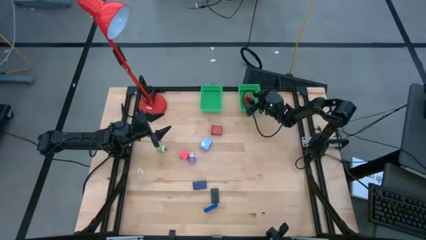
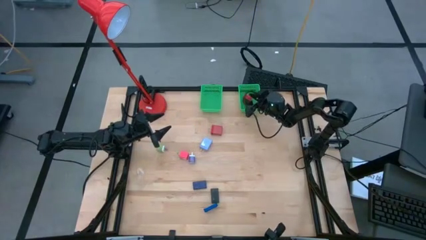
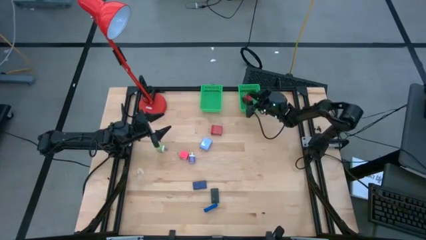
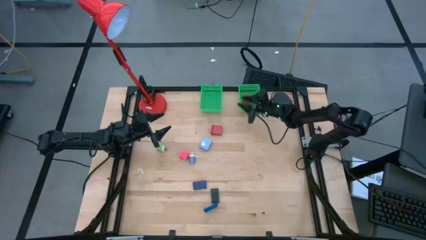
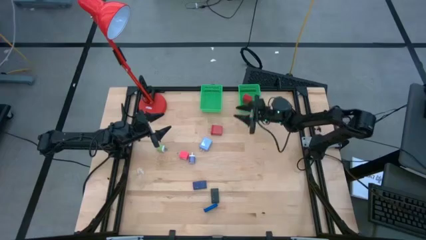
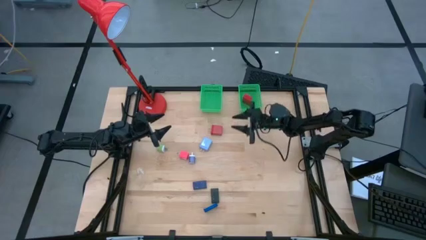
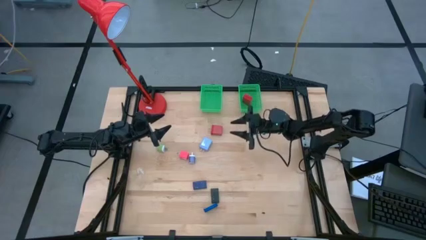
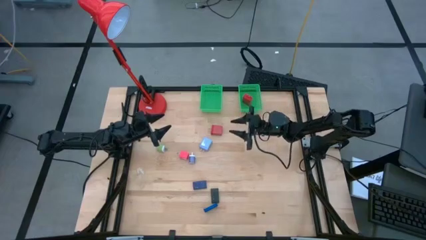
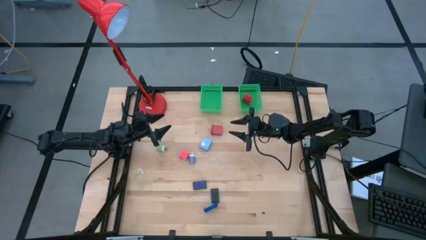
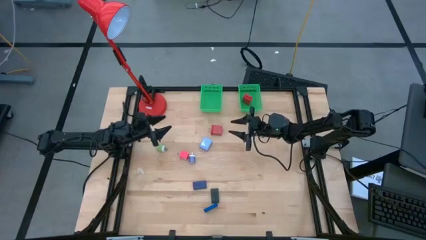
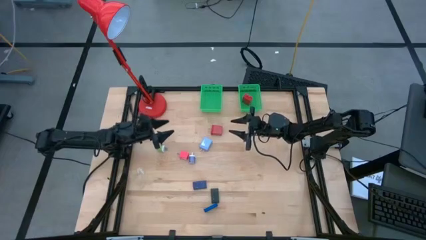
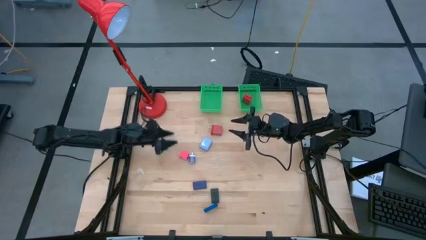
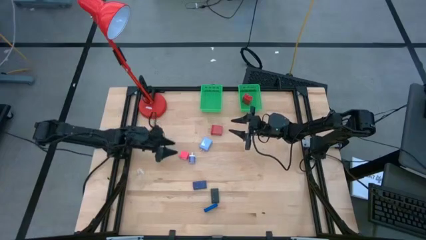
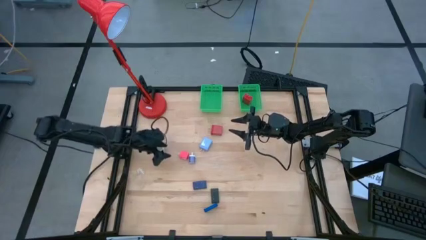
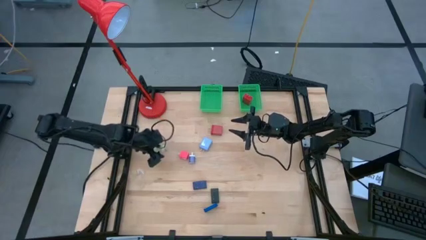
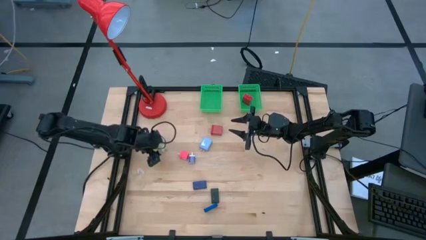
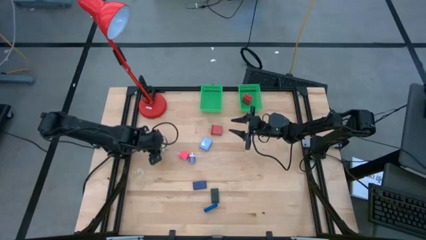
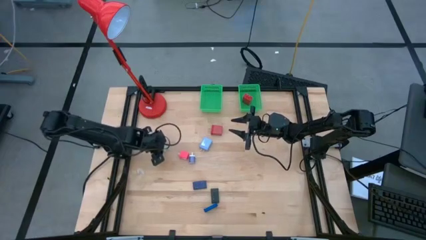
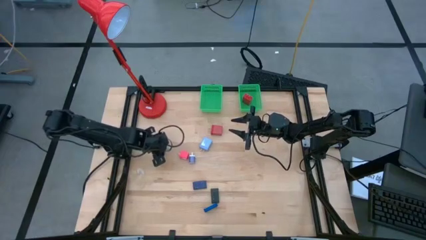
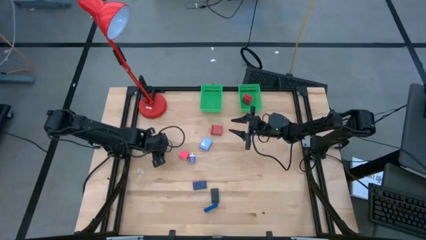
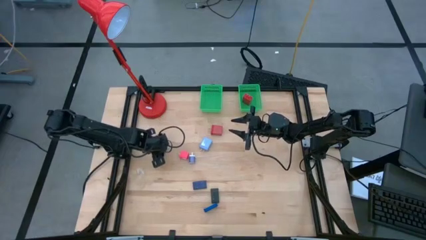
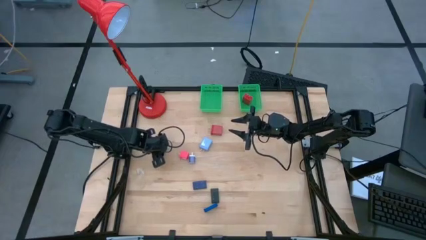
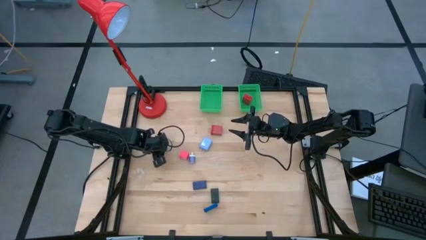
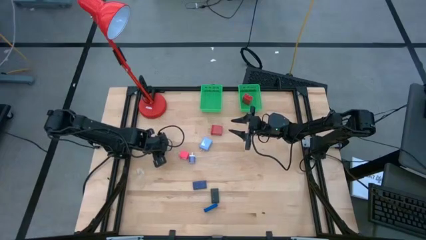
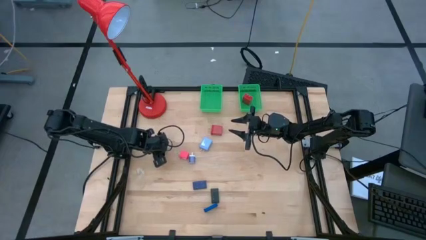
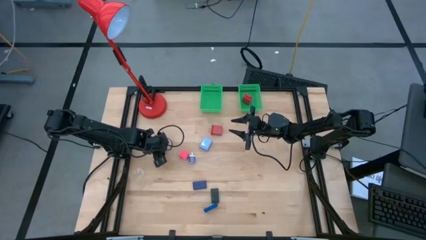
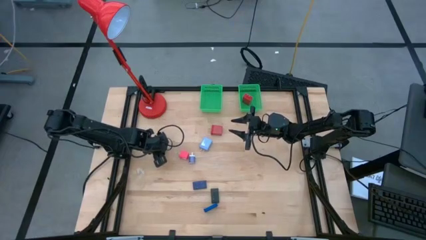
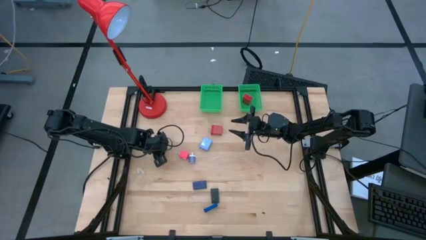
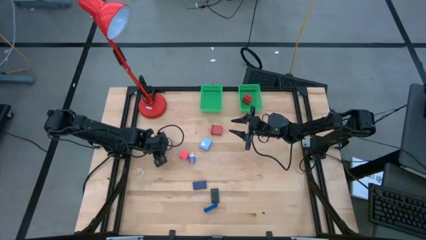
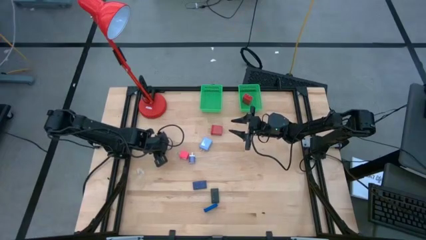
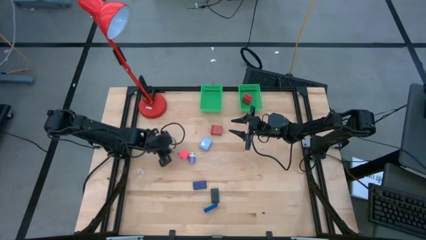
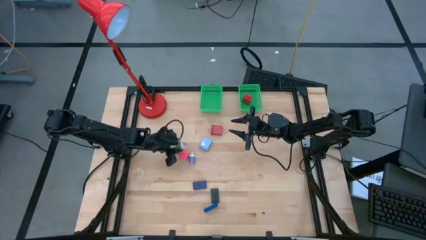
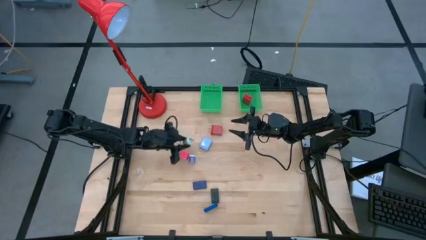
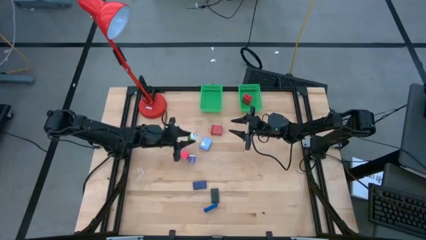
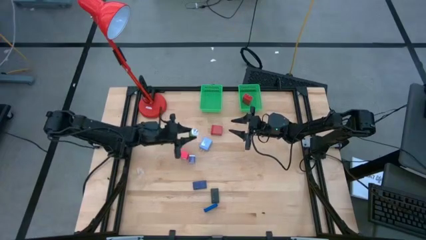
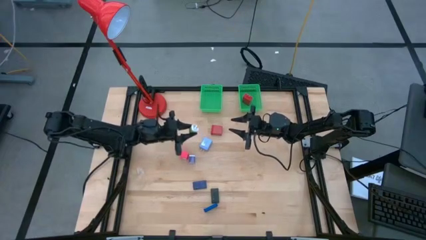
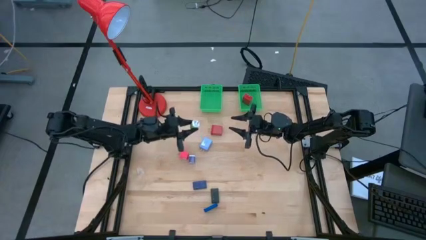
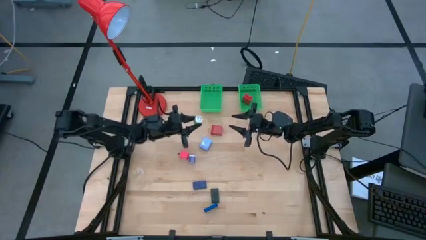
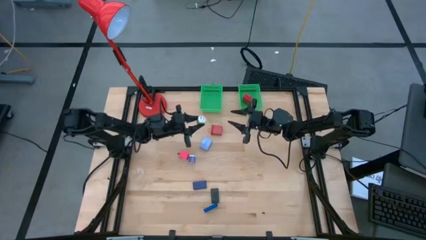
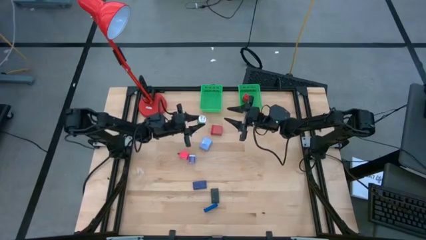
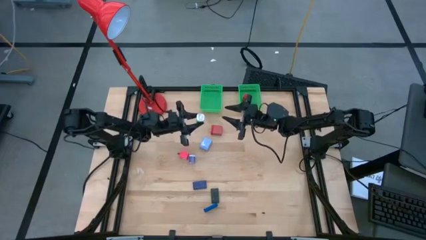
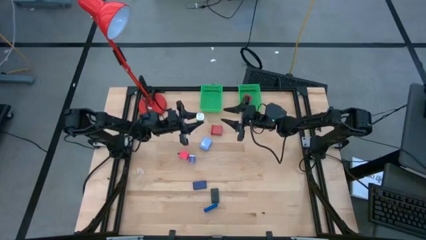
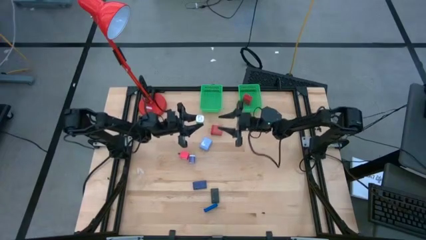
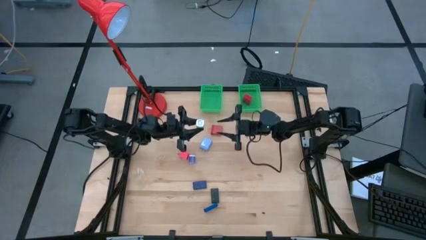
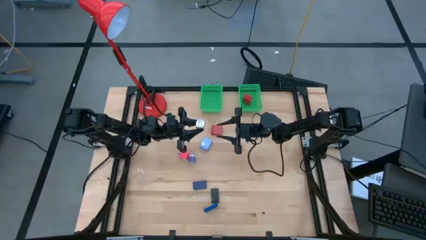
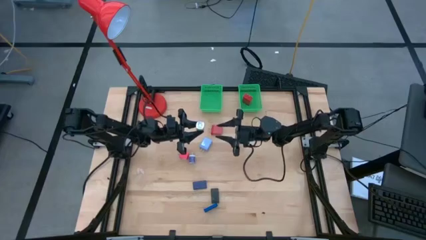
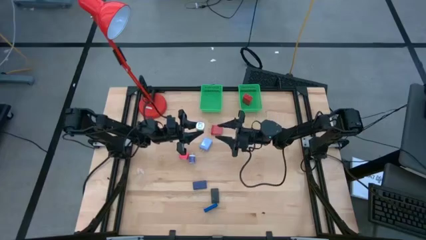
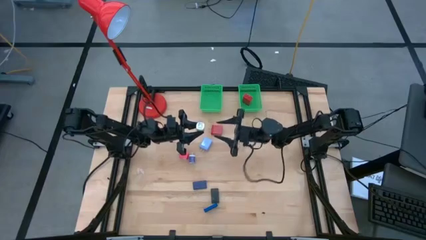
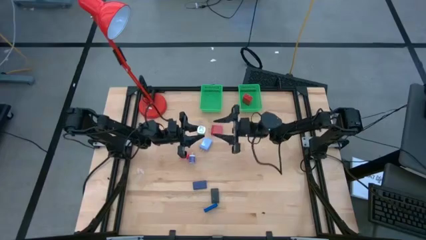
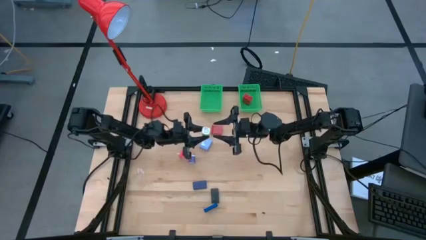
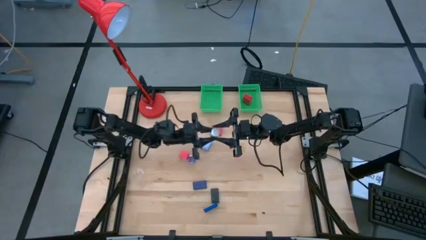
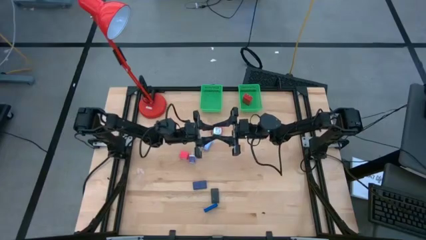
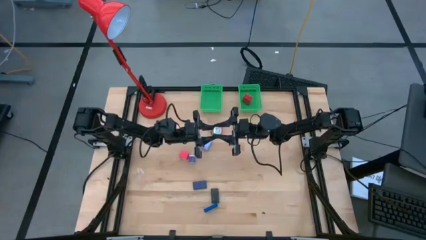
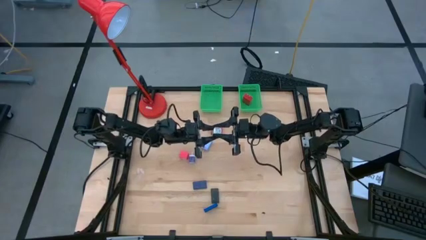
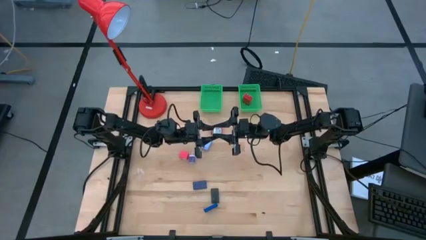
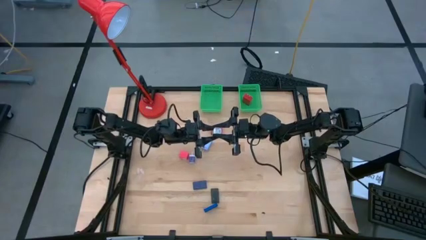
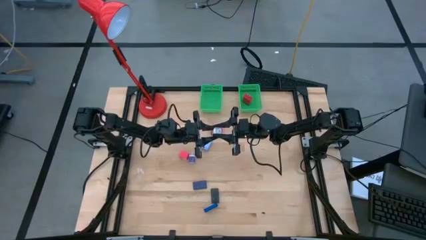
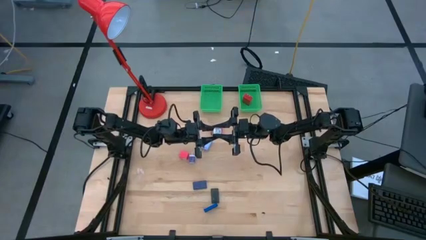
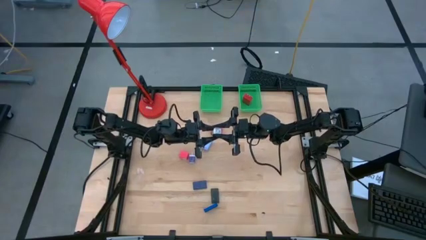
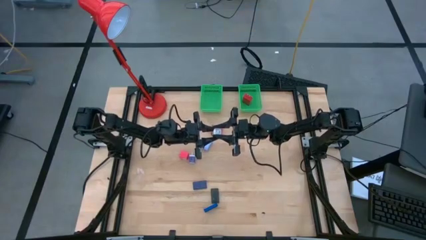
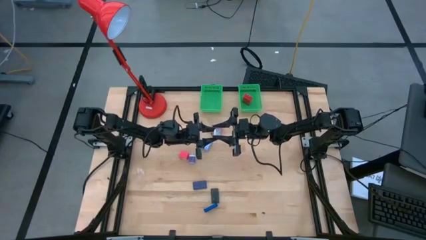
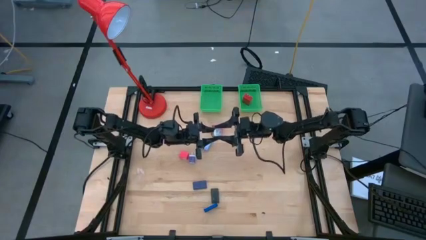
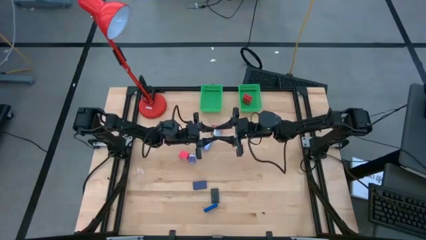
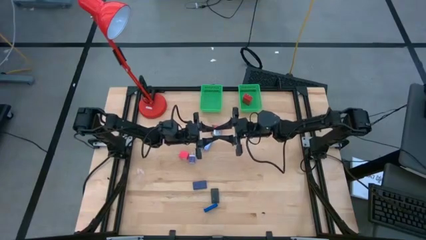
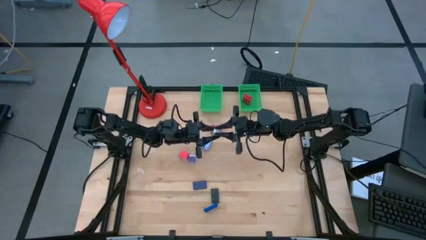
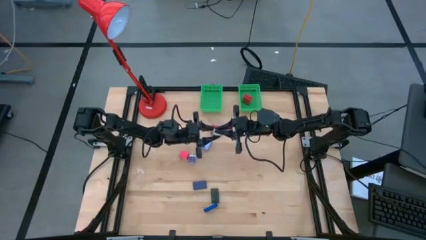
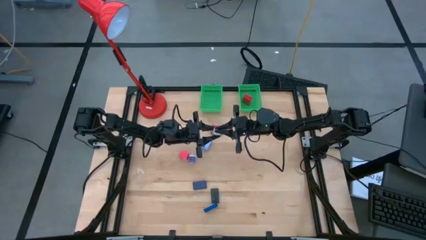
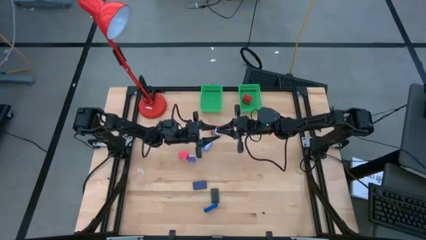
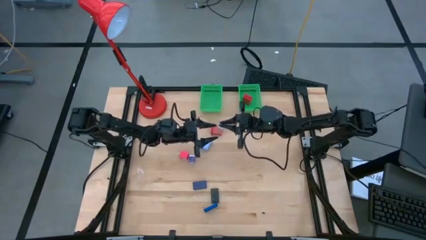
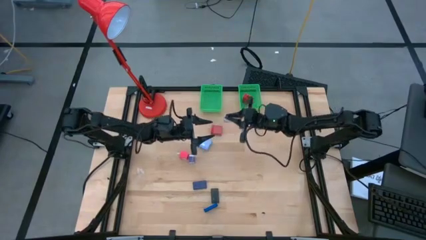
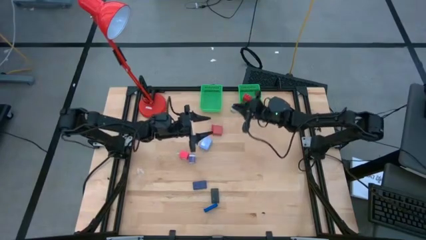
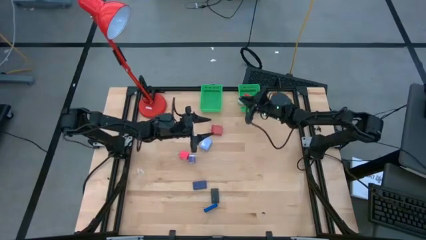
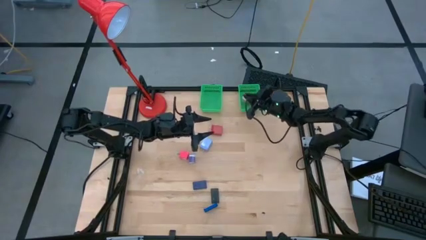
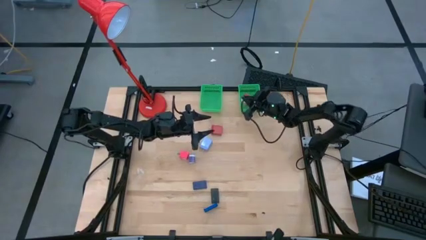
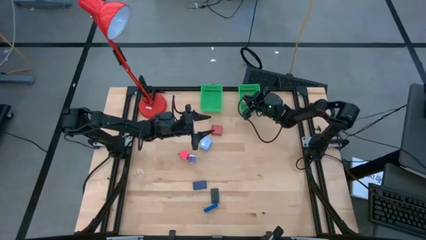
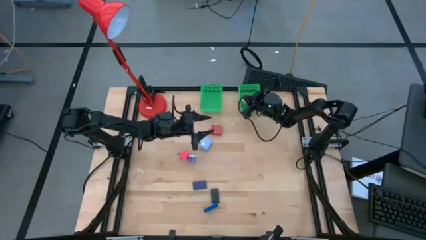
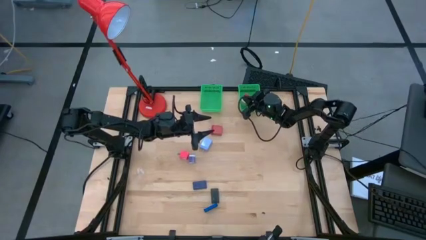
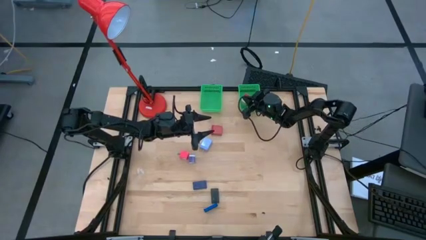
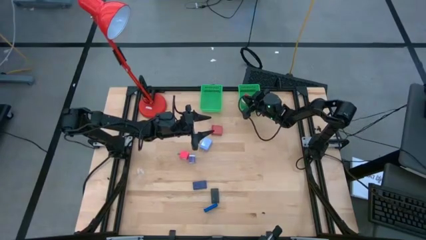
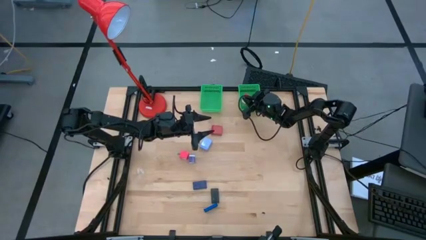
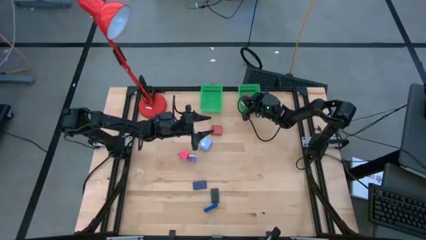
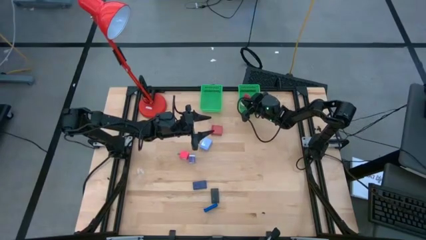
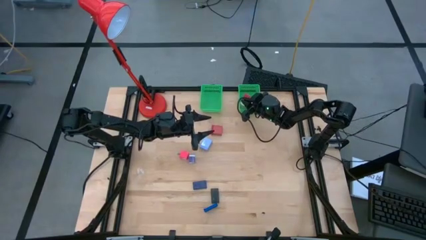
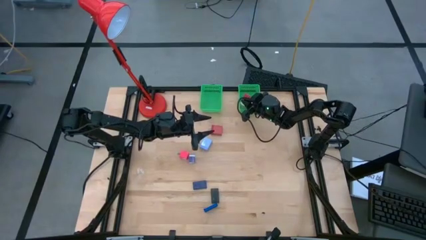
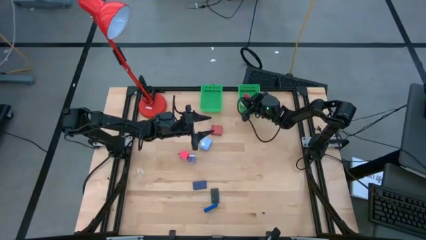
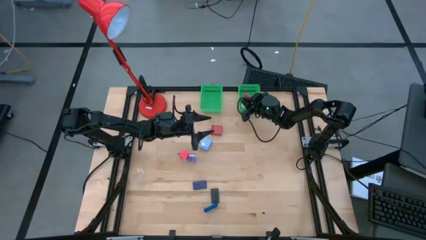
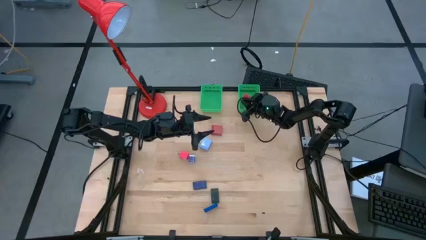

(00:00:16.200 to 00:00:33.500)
Task: Pick & Place Office items
Put the green charger adapter into the right green basket
